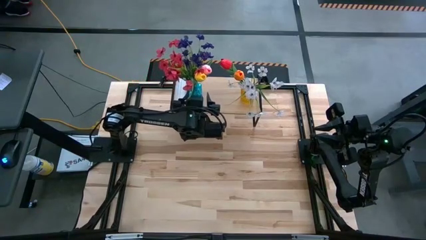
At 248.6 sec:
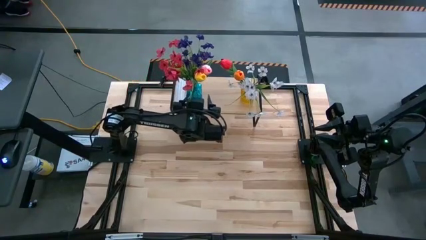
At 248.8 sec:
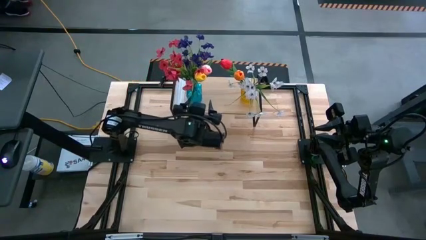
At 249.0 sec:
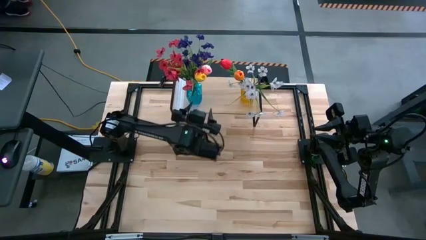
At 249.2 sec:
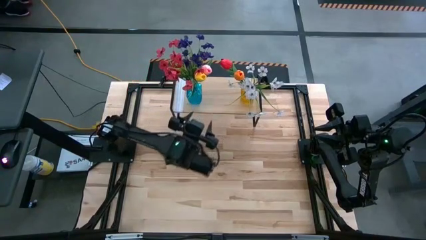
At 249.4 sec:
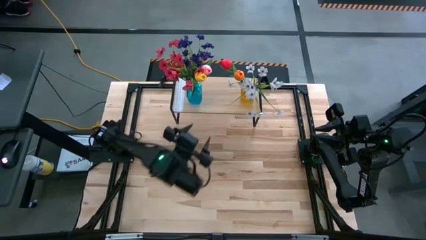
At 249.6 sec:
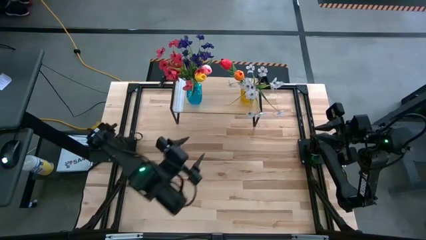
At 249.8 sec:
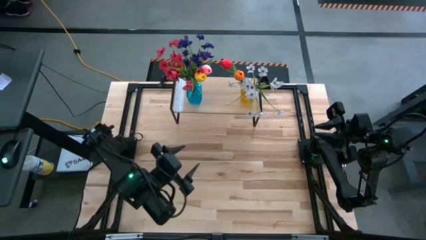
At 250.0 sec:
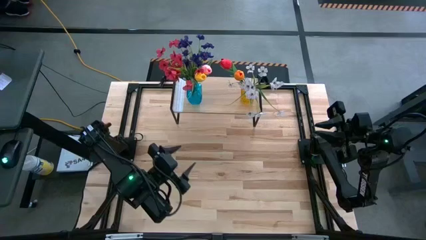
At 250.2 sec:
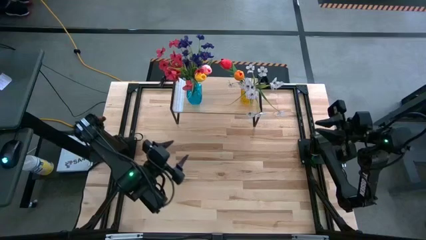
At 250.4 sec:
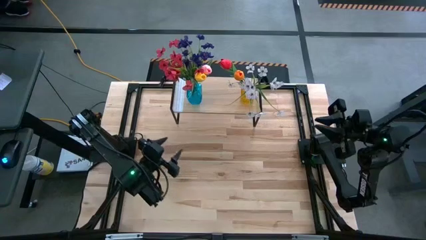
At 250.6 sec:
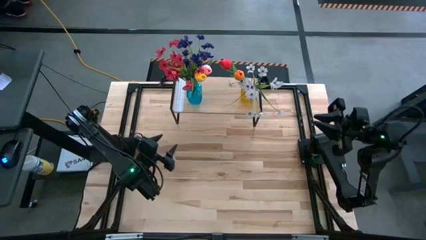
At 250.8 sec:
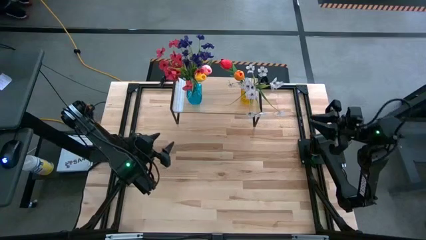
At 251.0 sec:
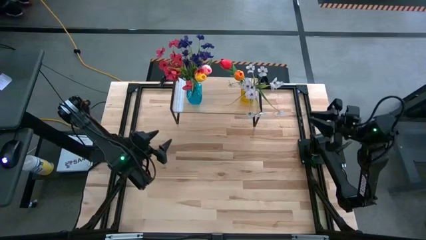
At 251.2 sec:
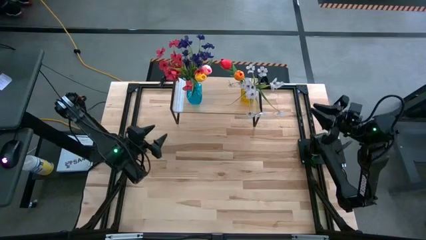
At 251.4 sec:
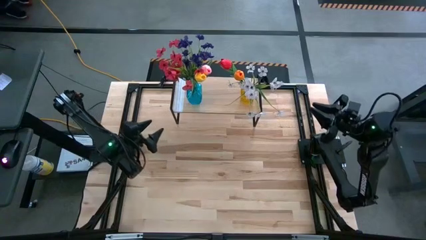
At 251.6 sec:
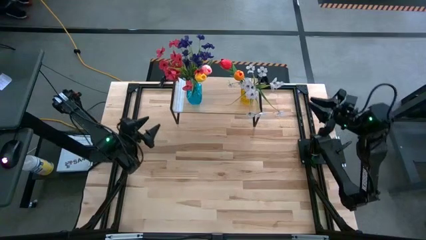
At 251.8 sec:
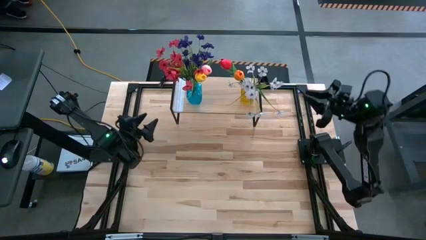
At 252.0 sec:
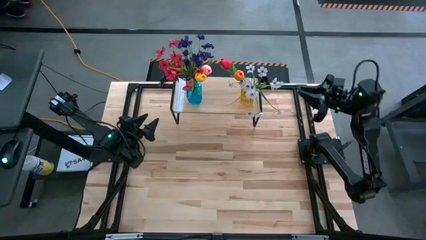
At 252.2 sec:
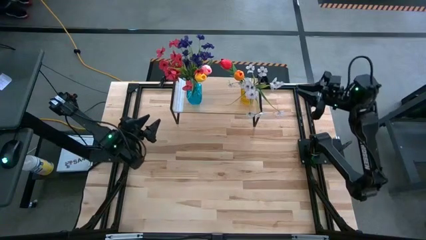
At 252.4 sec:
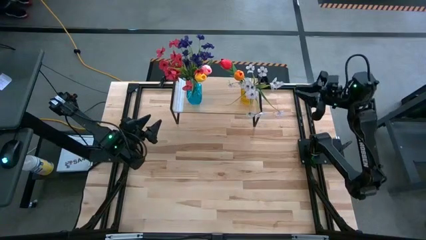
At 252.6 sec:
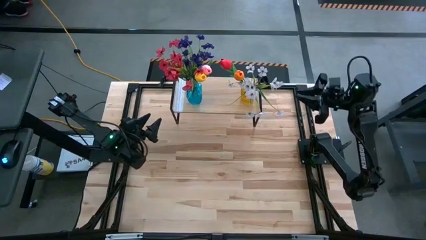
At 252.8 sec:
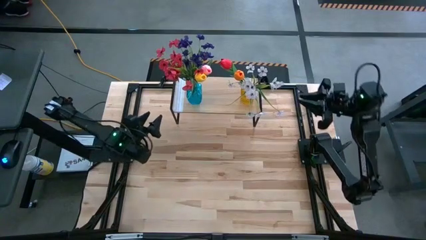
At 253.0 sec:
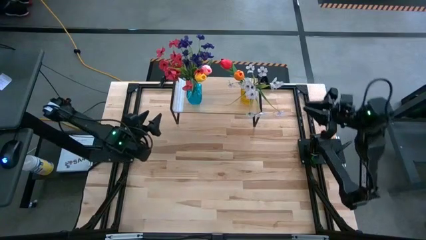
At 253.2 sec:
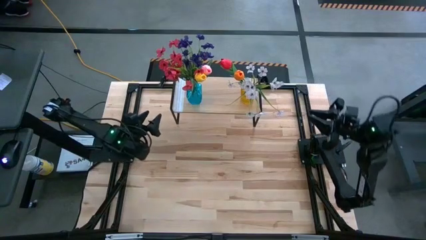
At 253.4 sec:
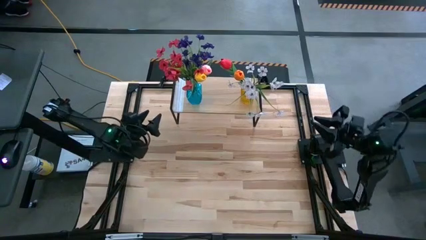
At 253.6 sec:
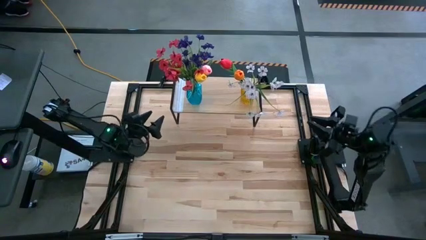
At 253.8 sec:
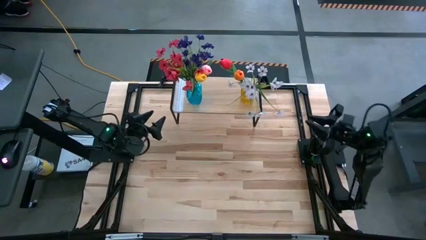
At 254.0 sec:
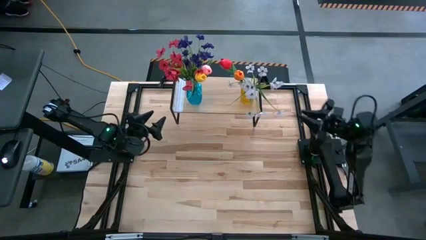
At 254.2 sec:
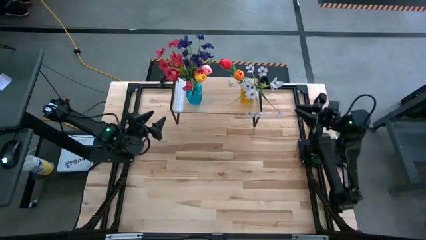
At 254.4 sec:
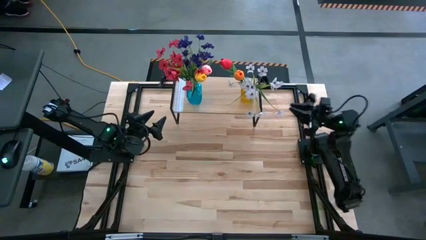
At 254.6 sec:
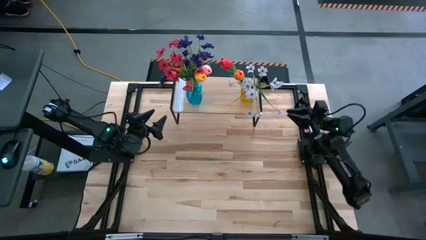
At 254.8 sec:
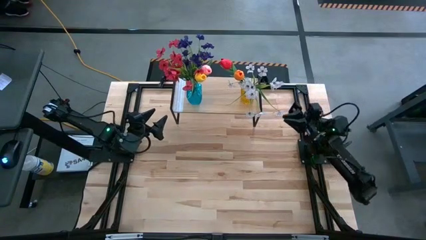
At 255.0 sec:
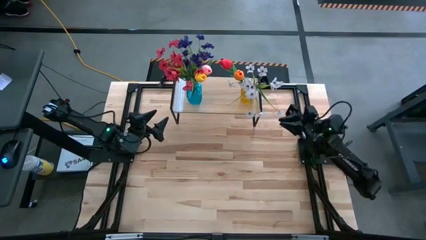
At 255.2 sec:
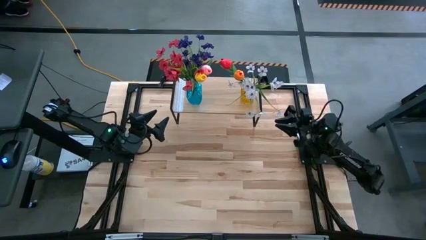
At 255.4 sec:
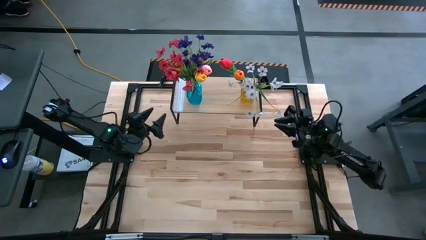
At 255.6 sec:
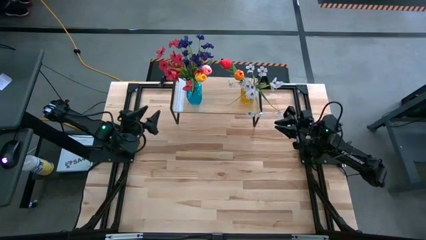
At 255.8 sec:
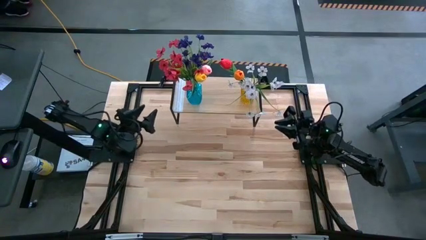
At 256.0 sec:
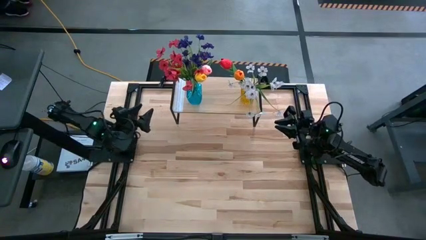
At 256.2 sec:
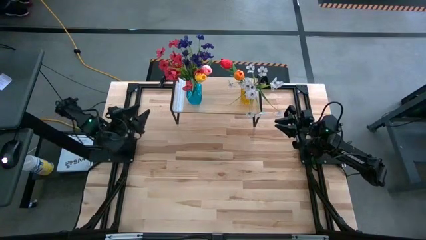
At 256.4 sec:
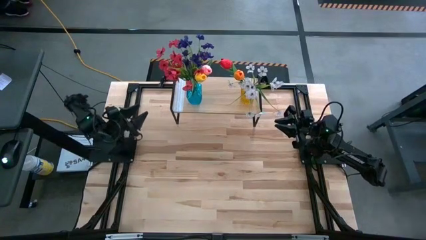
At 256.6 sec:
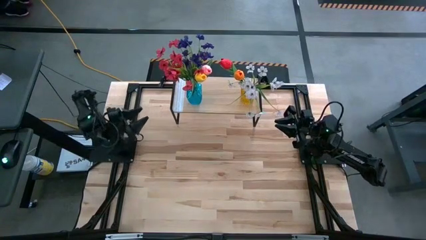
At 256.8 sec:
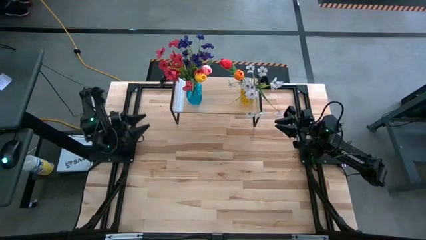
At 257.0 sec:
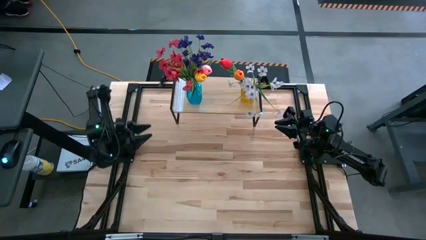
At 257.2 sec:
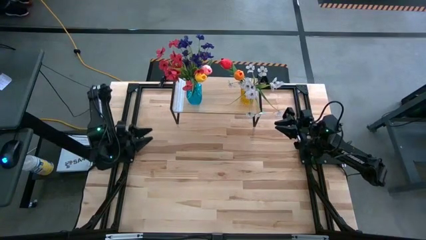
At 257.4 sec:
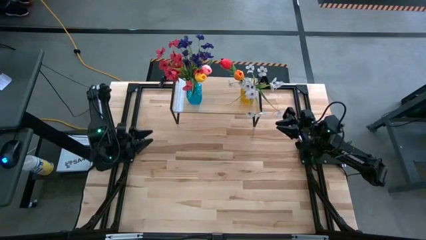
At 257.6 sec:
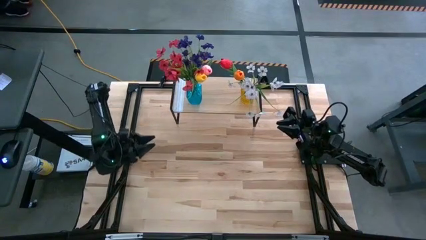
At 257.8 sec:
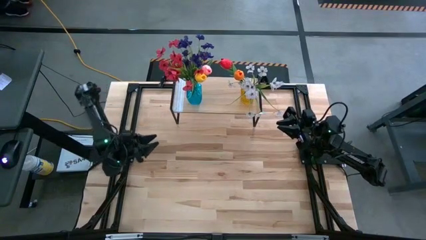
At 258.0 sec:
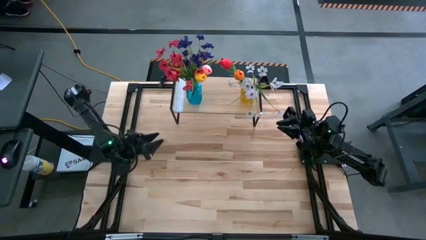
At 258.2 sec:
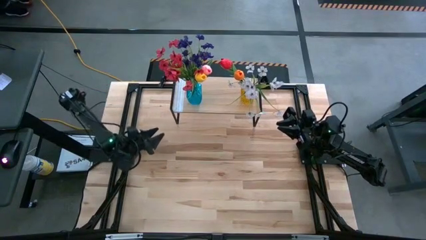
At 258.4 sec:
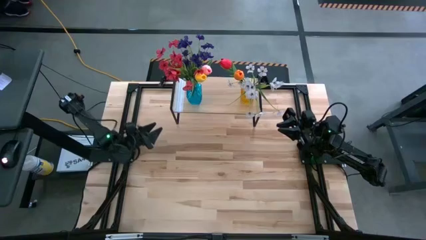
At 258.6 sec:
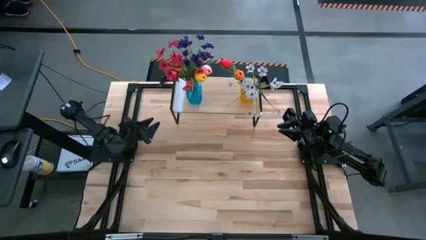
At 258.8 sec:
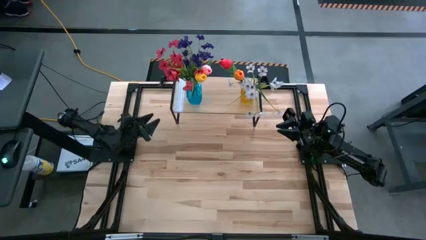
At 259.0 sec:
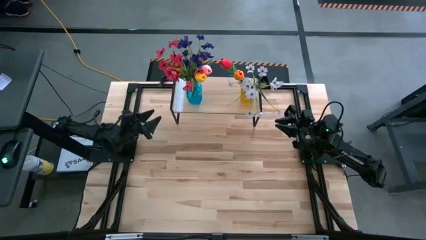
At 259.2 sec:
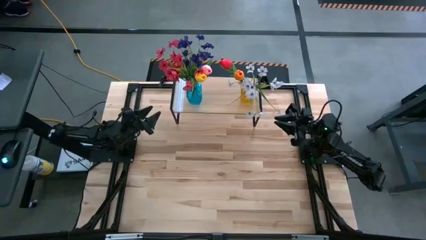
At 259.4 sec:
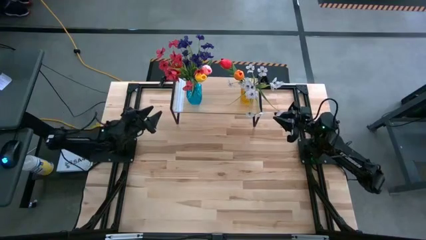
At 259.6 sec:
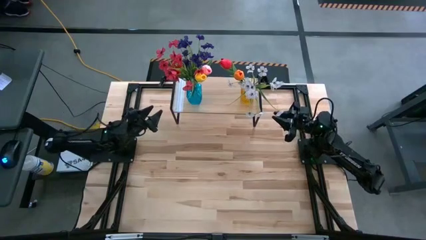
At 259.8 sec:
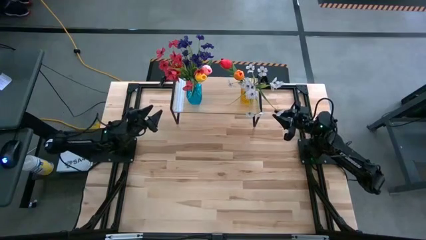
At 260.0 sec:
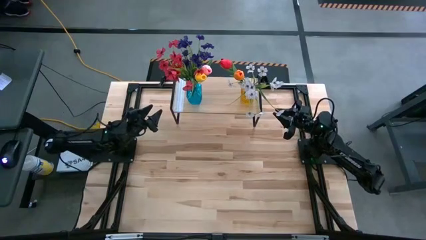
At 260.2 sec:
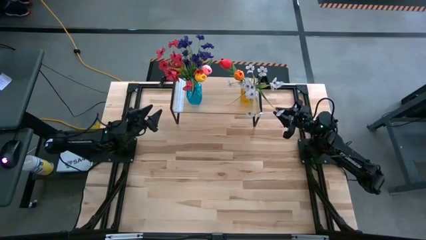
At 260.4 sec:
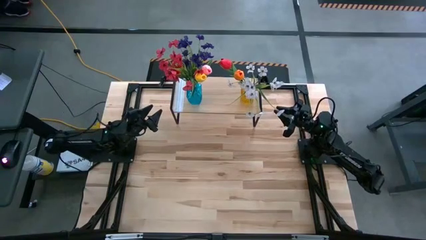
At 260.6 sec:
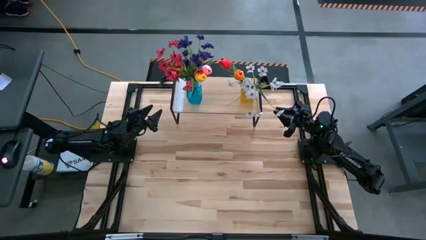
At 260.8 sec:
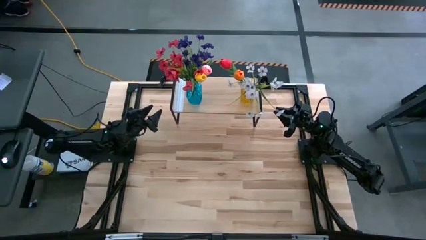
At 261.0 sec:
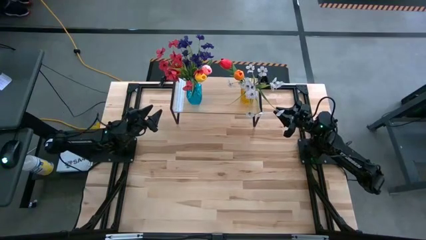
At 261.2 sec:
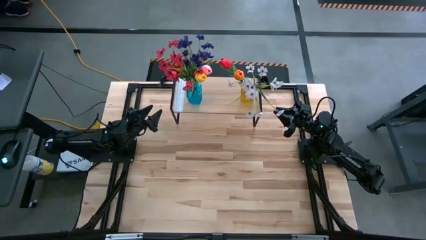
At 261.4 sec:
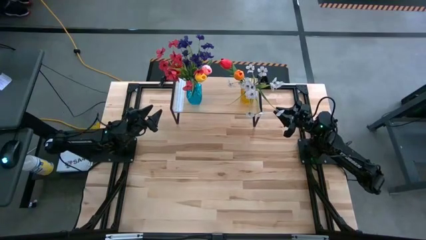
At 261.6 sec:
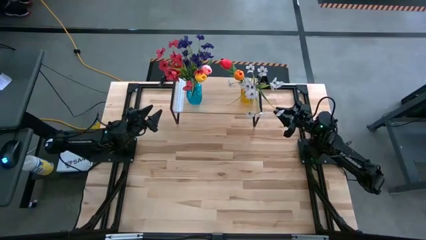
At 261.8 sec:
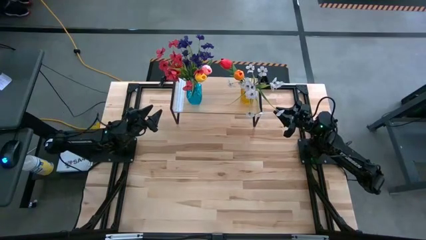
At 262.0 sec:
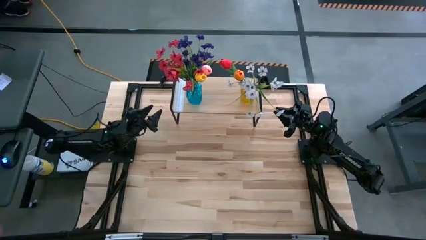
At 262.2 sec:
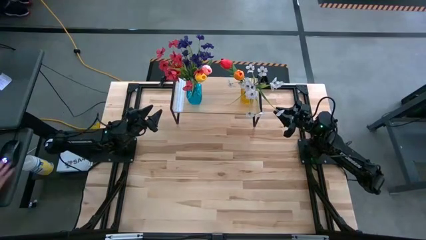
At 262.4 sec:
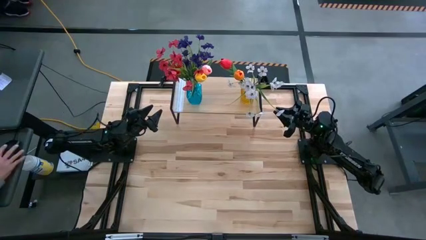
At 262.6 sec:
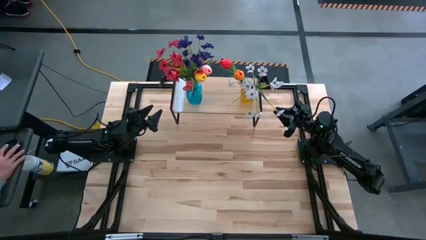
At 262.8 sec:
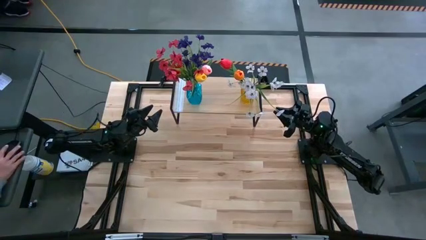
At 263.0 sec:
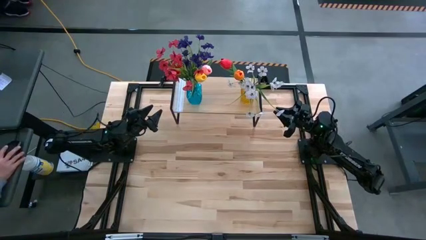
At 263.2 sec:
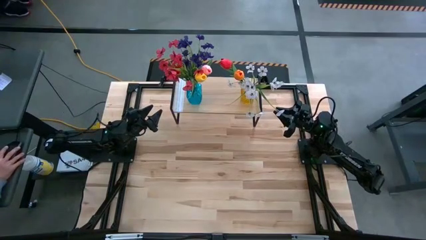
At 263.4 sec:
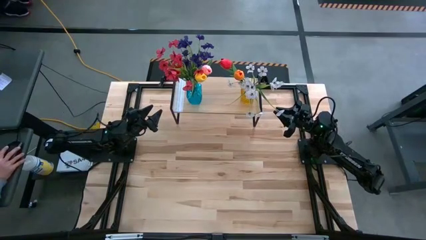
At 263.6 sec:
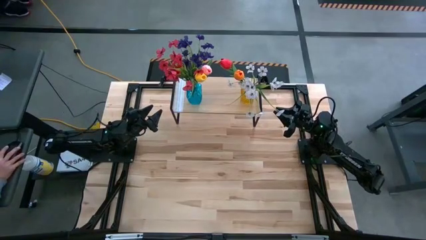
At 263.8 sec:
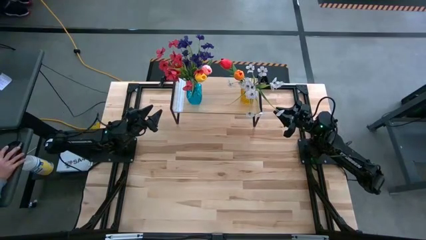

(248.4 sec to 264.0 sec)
Task: Pick and place flowers into a vace then onto a shelf
Return to Home Position
